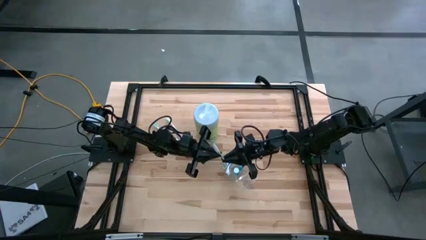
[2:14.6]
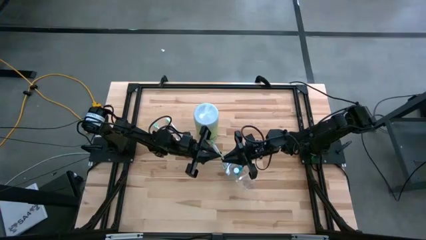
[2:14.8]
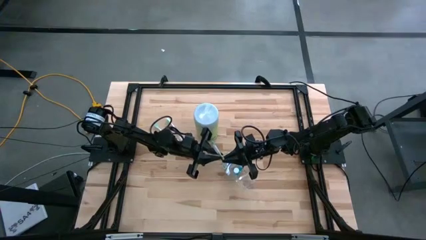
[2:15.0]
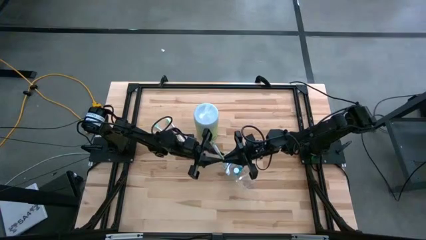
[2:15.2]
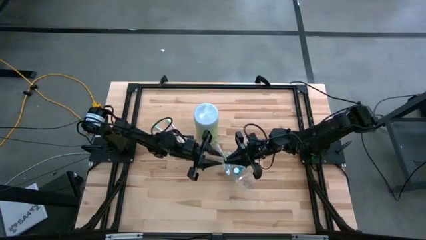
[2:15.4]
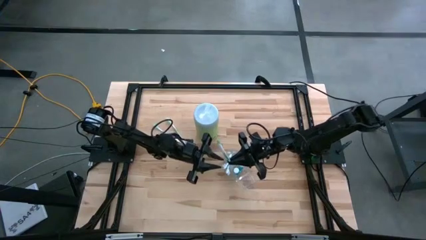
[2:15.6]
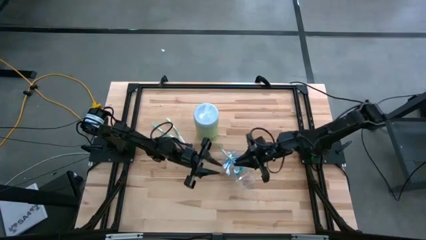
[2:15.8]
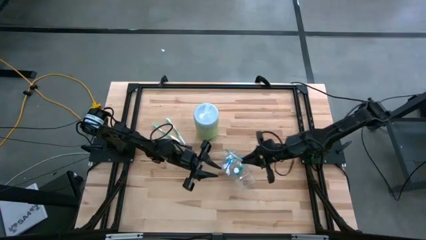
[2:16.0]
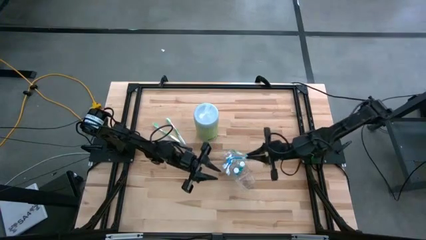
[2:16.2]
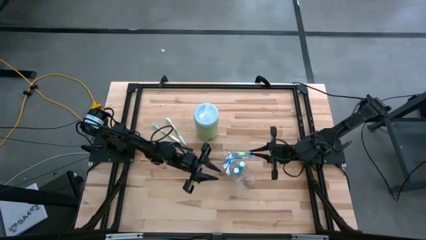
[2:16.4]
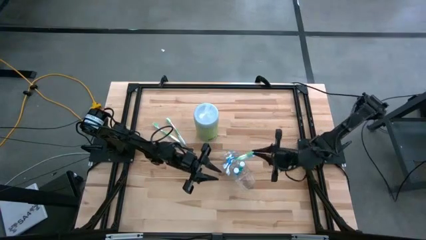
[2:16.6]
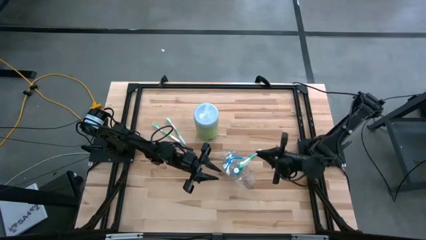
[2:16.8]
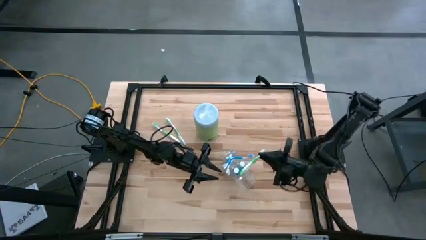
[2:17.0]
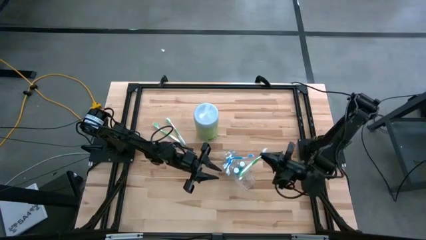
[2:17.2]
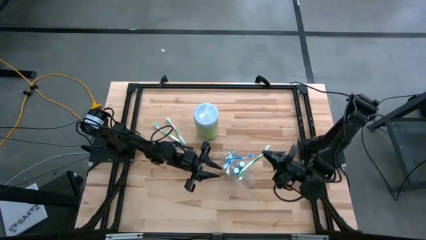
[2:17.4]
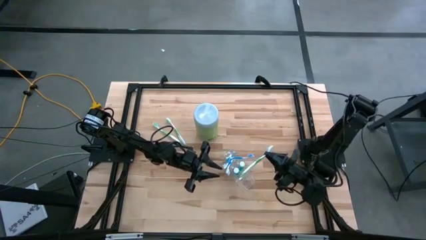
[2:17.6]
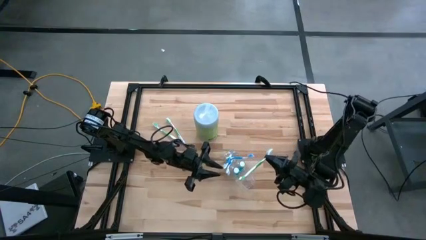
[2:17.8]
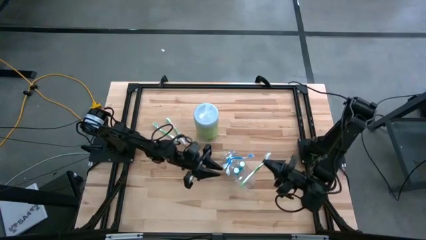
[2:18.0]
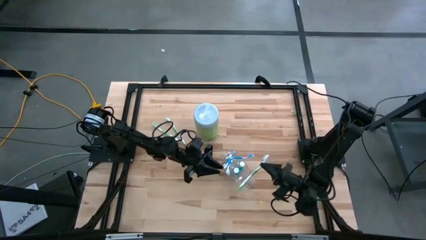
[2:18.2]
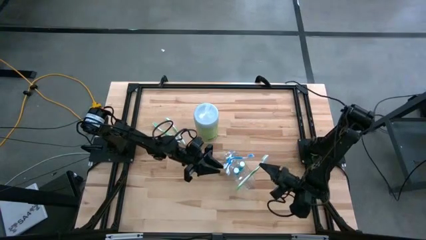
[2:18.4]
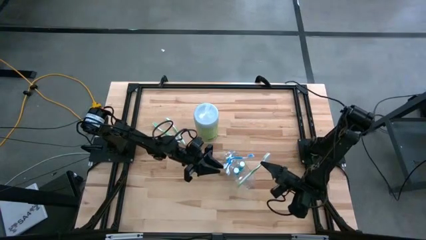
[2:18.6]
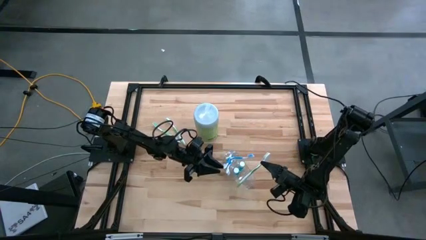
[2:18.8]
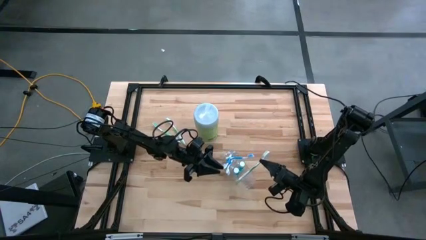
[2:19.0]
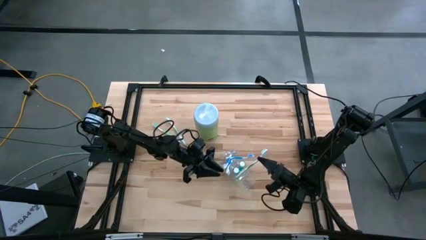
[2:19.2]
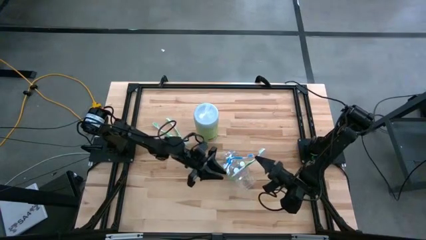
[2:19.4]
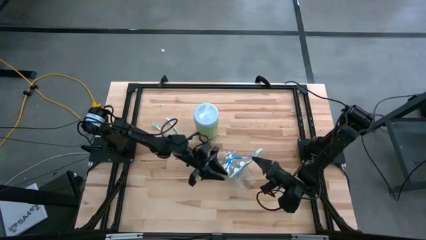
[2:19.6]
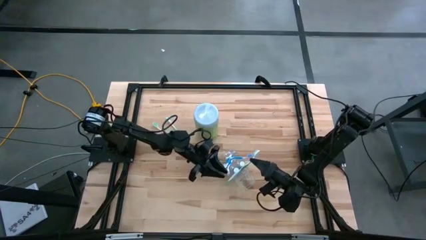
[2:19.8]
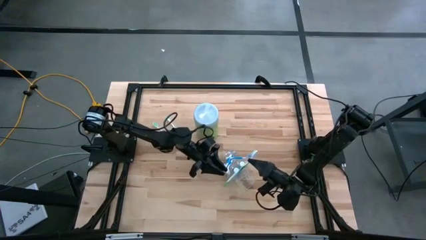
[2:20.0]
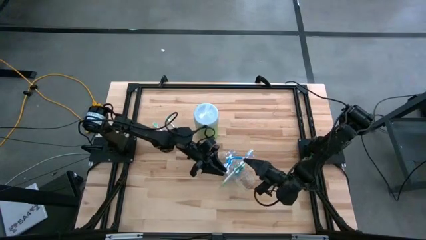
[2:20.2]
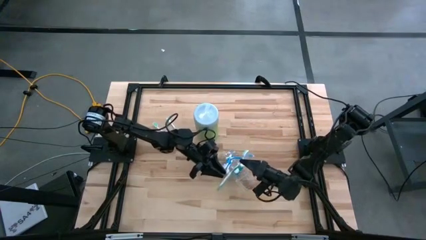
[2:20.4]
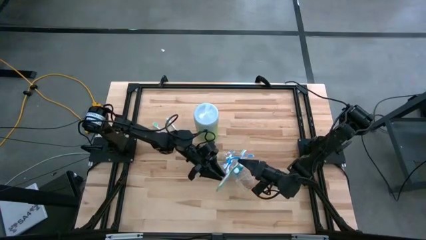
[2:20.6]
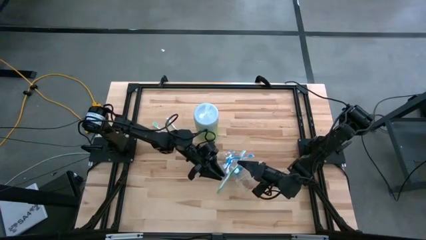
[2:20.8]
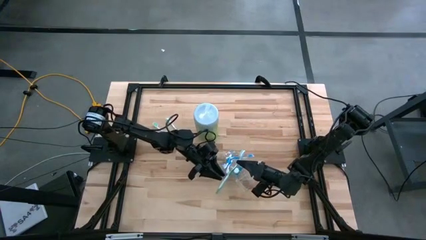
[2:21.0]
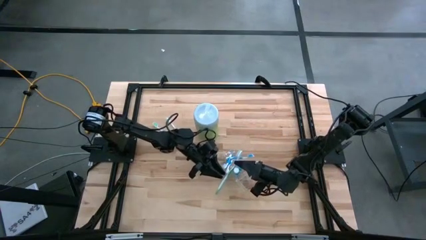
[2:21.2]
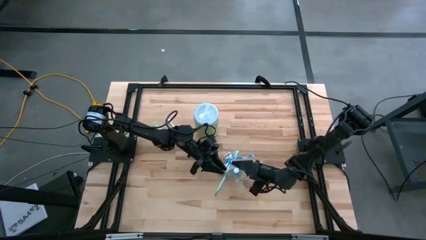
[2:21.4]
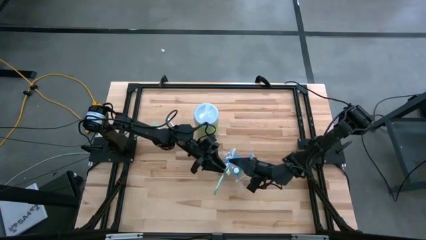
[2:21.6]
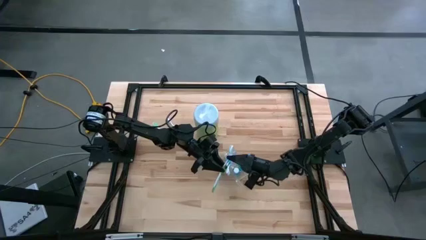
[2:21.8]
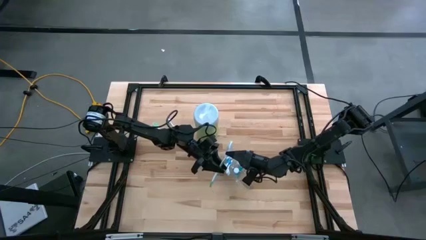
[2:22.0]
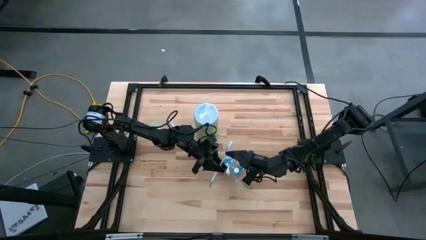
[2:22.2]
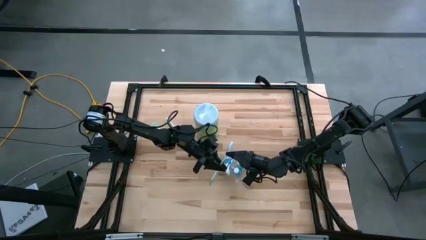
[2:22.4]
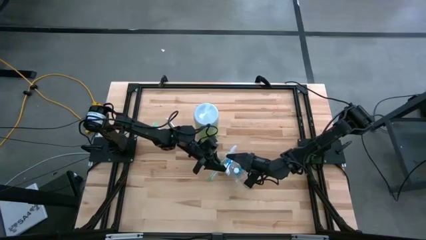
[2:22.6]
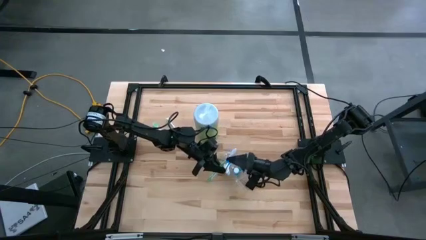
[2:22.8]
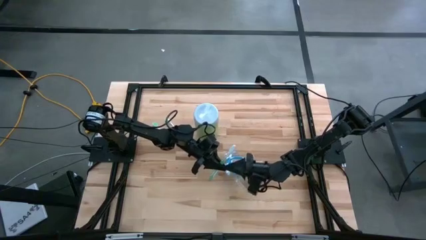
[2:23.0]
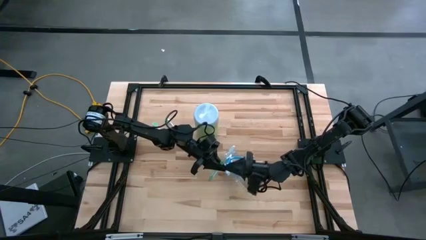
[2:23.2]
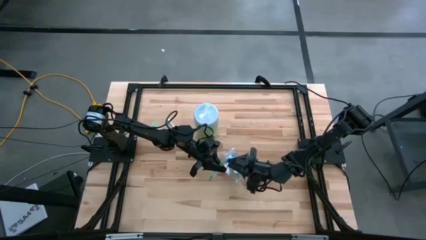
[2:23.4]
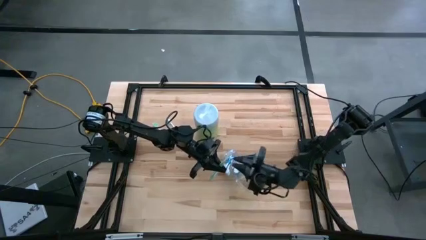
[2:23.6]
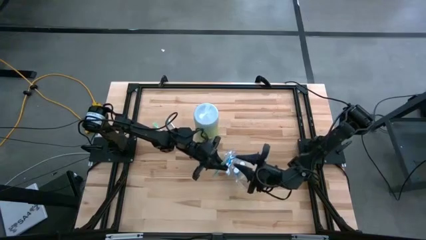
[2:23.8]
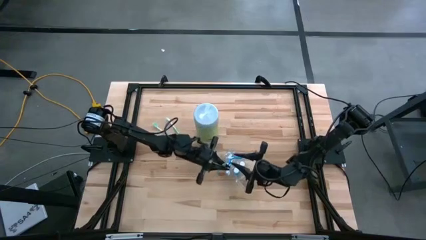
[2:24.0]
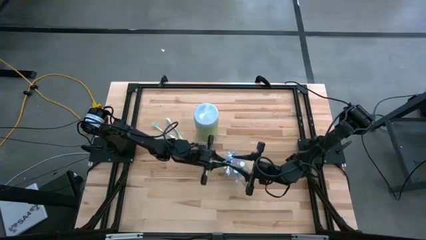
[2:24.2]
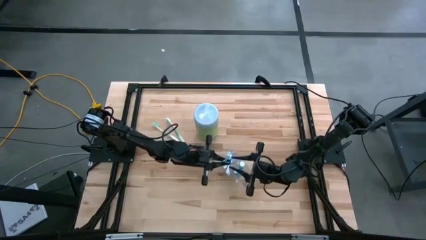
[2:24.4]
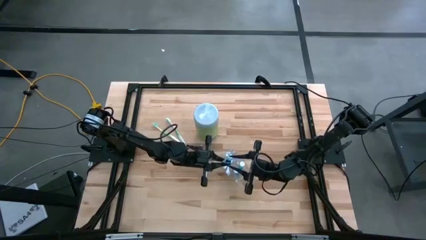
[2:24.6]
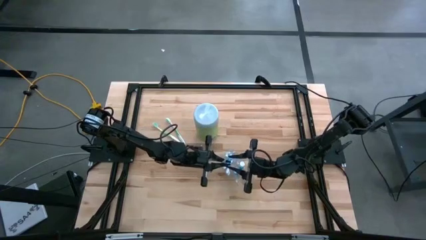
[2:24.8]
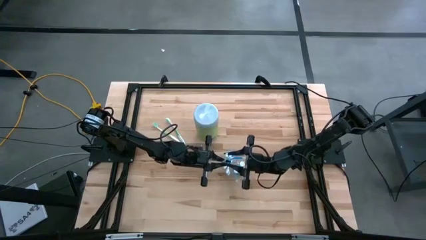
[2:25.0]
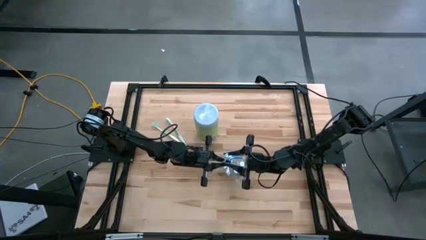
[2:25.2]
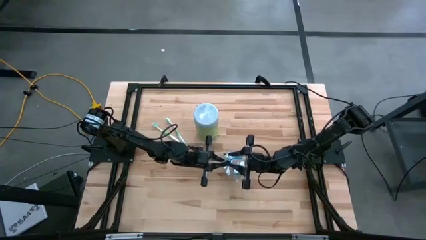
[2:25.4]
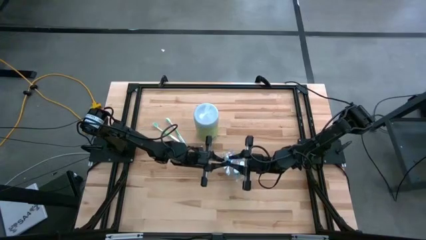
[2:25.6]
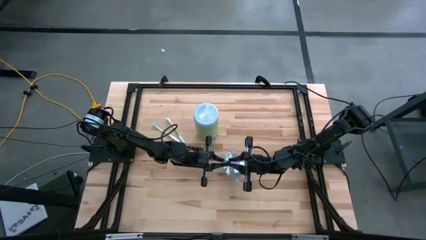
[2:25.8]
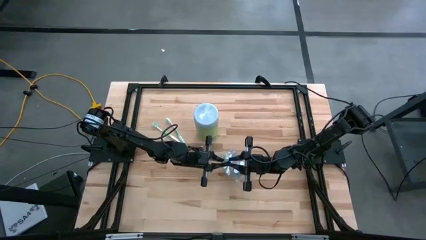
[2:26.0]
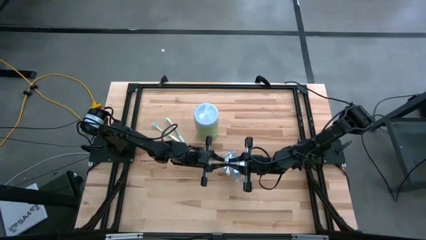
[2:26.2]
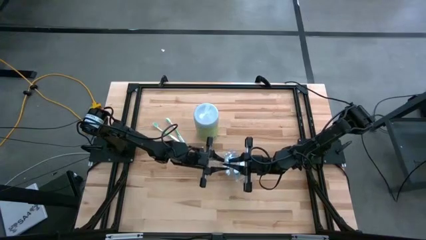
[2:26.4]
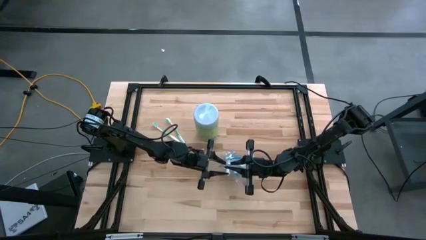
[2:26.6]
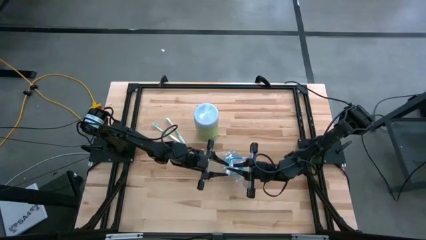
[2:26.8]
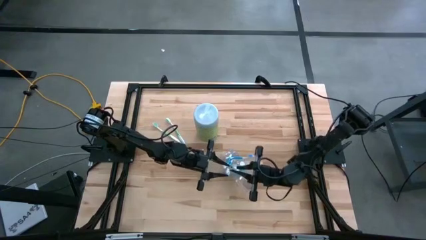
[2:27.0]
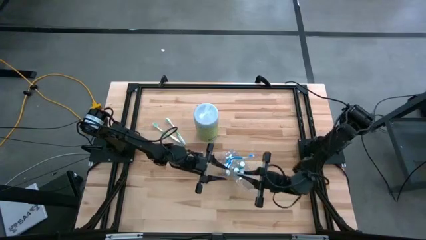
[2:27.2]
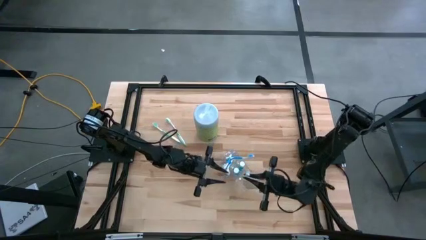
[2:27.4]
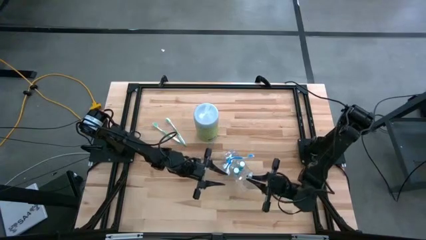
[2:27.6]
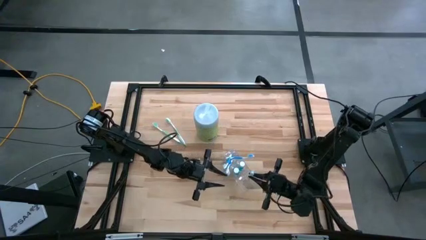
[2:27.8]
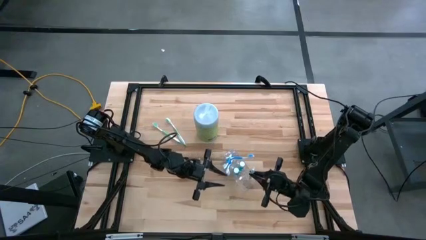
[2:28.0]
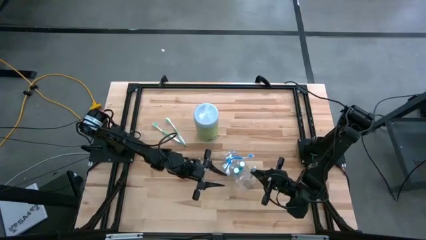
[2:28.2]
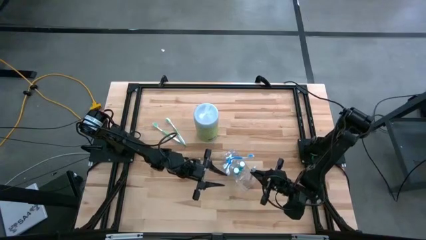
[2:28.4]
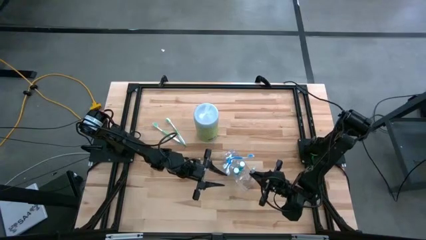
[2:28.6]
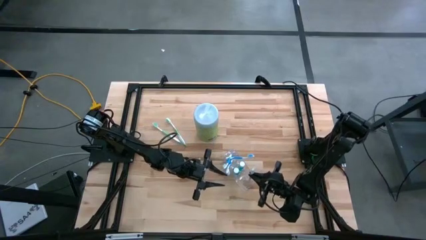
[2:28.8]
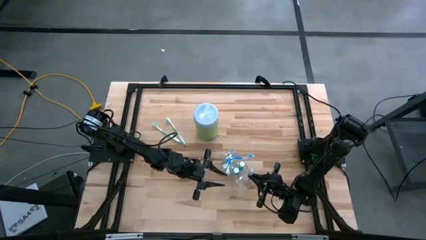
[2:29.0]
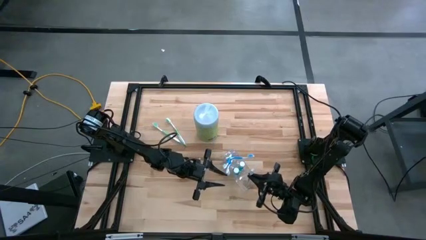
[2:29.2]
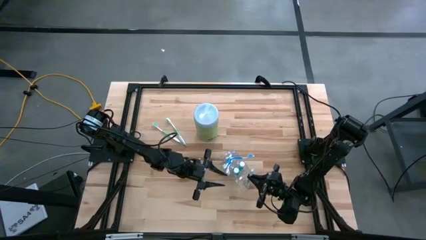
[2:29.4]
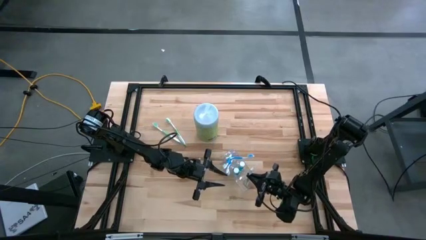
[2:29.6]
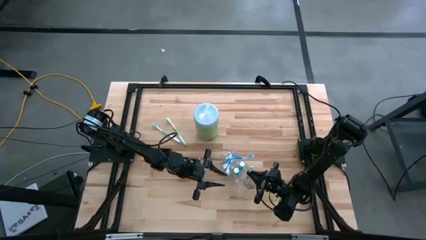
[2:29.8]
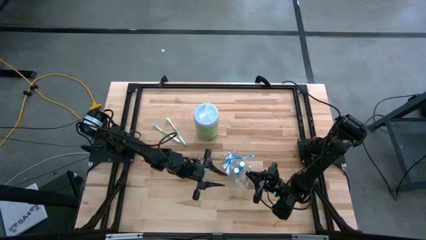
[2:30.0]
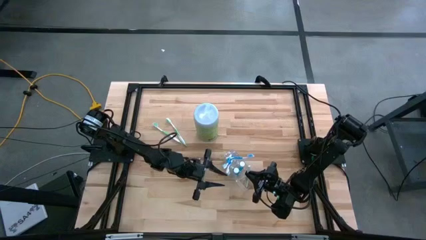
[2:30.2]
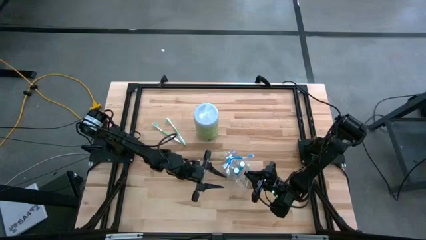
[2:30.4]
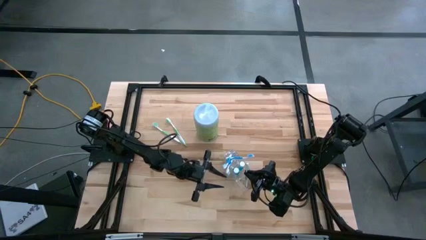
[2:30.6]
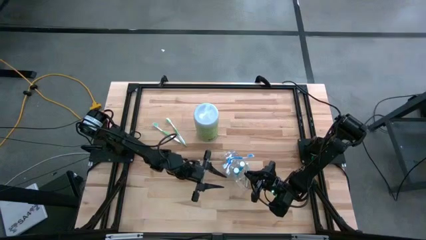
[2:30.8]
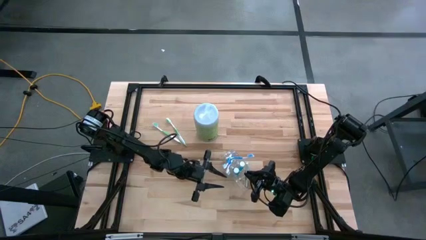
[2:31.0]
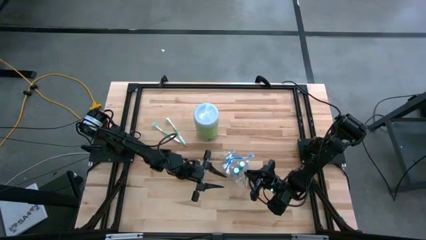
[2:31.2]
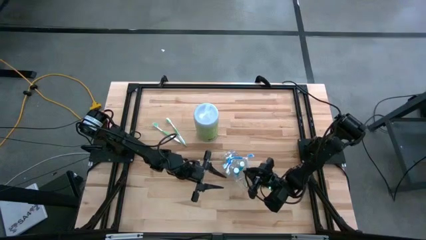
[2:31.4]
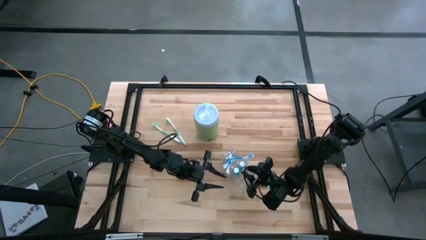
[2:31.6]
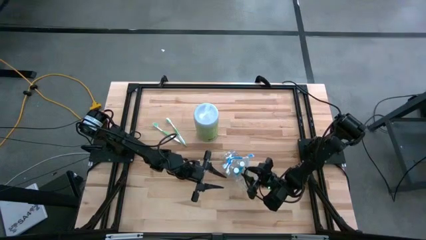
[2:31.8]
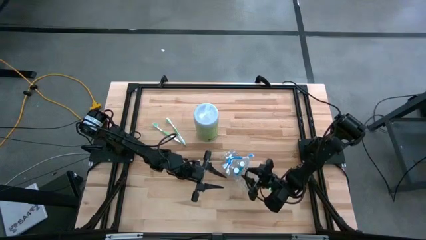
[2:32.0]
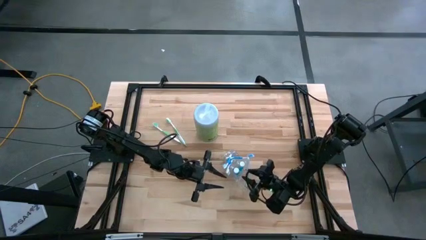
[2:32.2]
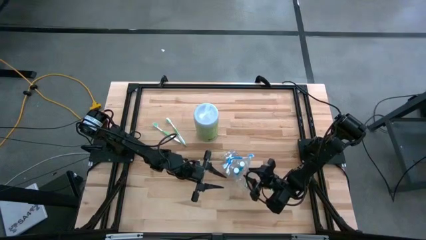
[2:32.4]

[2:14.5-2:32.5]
Task: Pick & Place toothbrushing station
Put the bottom green toothbrush into the transparent organizer
